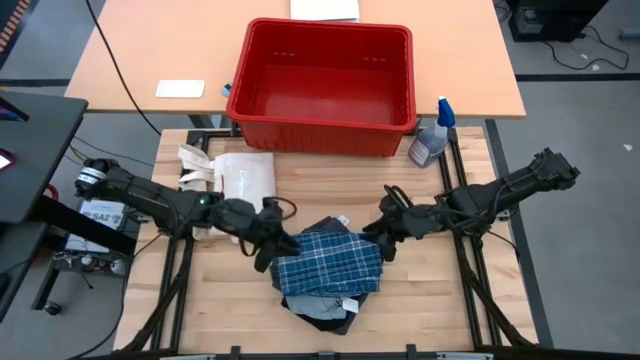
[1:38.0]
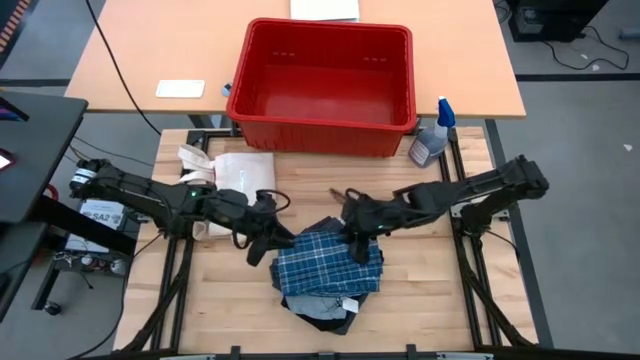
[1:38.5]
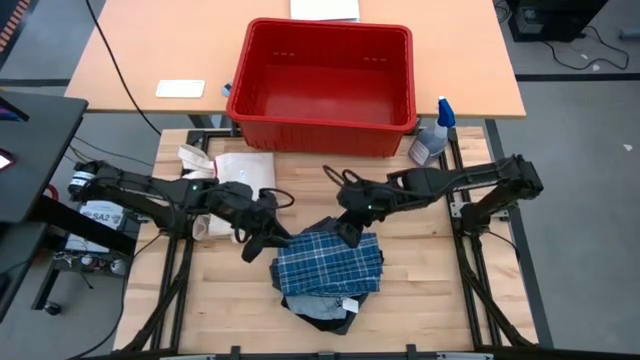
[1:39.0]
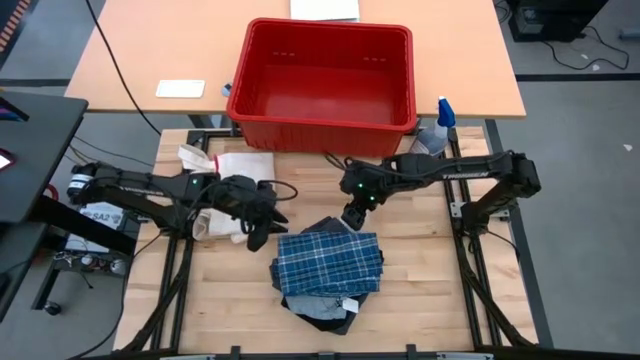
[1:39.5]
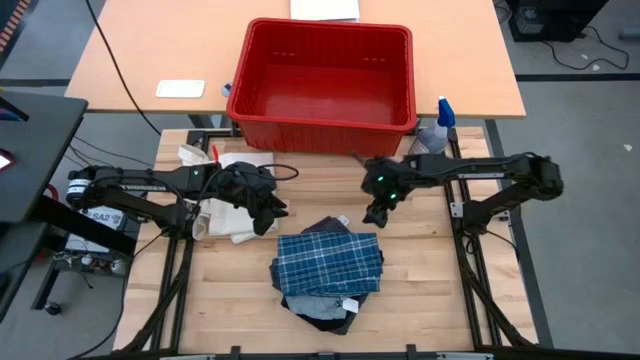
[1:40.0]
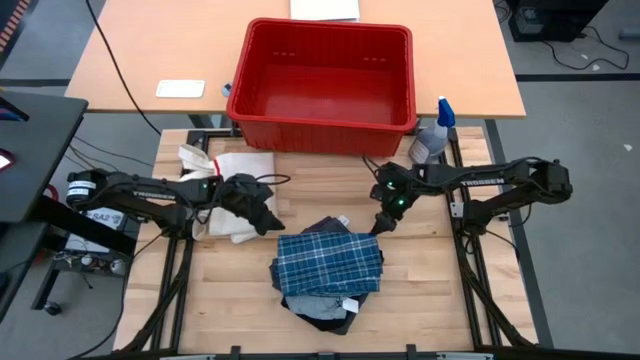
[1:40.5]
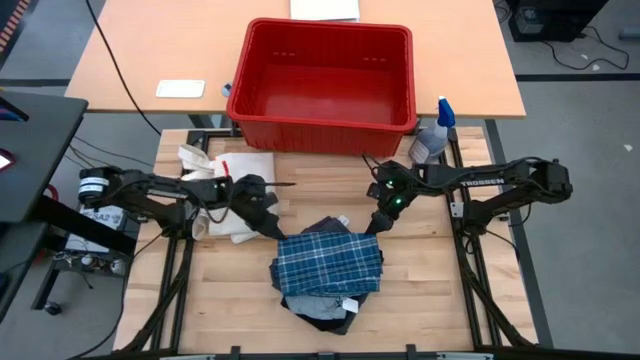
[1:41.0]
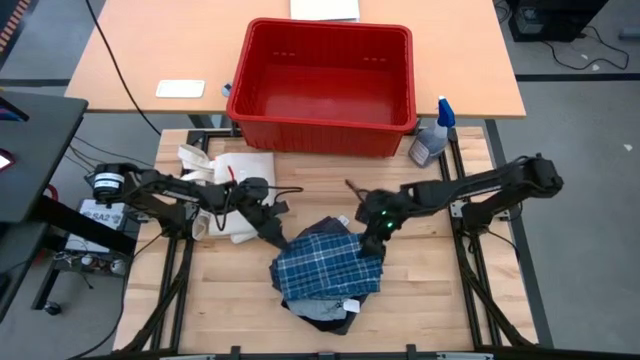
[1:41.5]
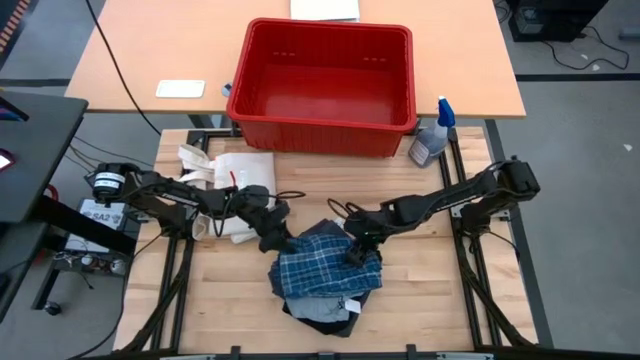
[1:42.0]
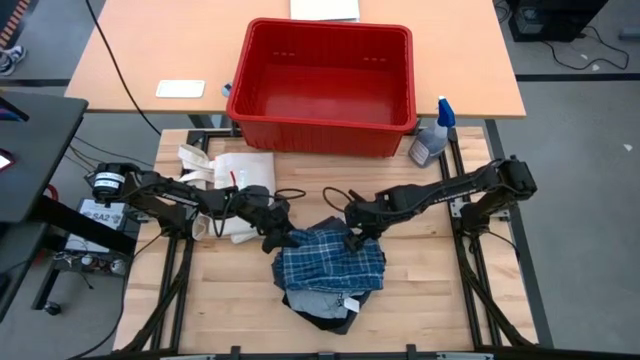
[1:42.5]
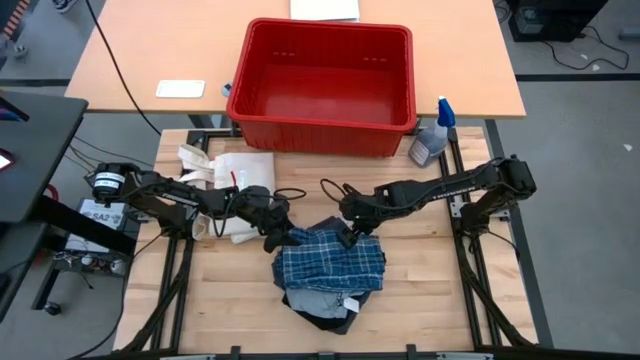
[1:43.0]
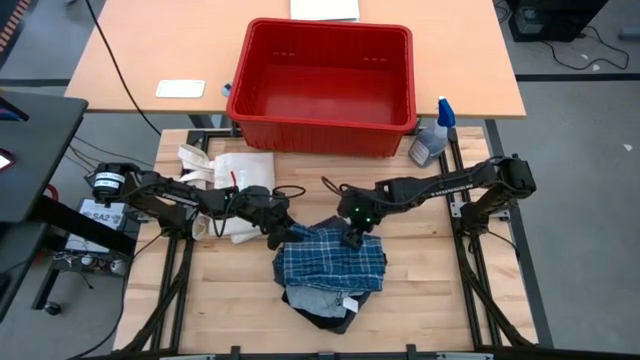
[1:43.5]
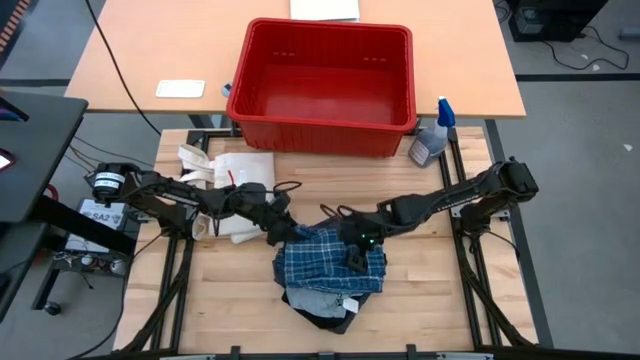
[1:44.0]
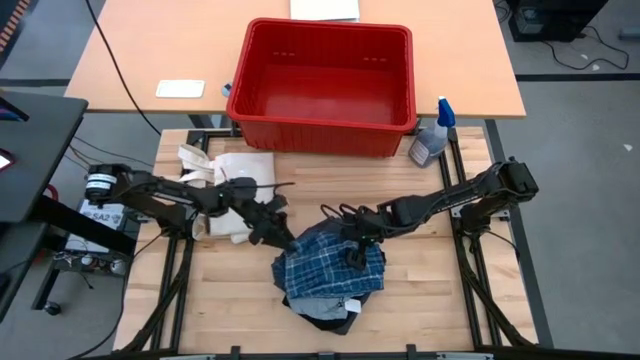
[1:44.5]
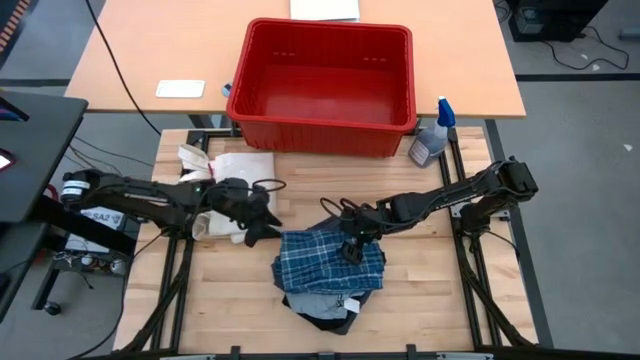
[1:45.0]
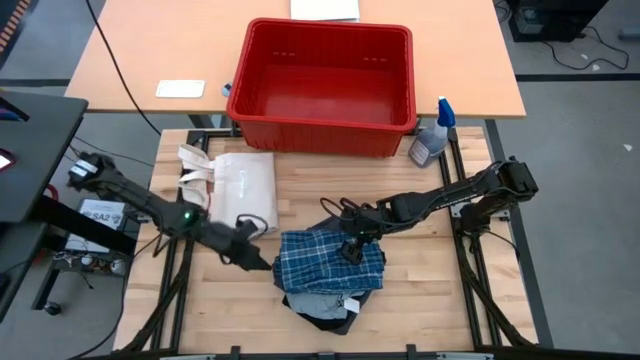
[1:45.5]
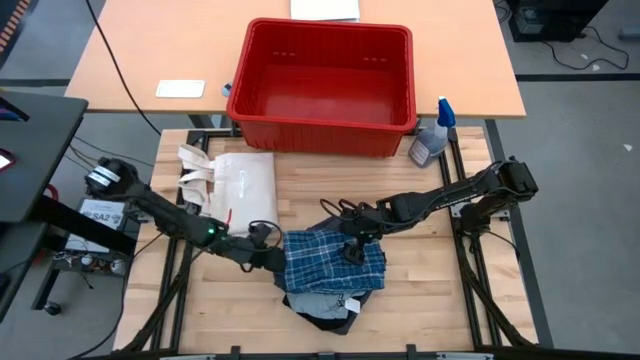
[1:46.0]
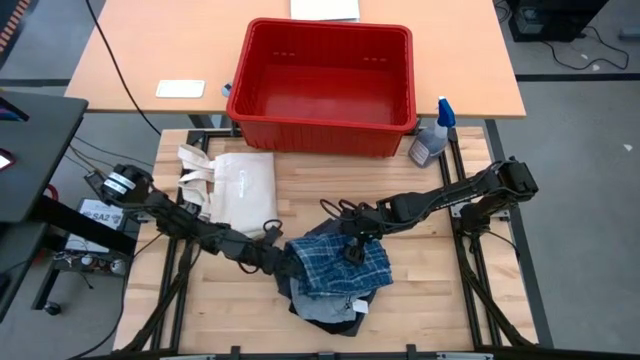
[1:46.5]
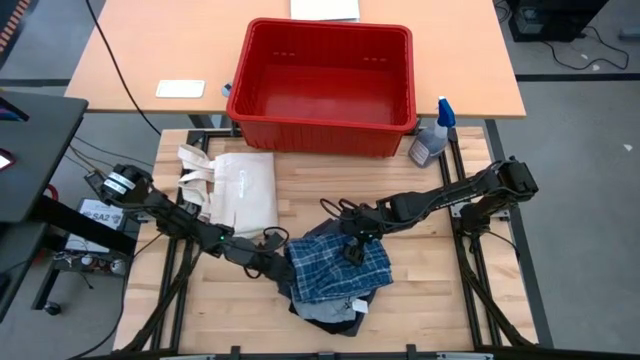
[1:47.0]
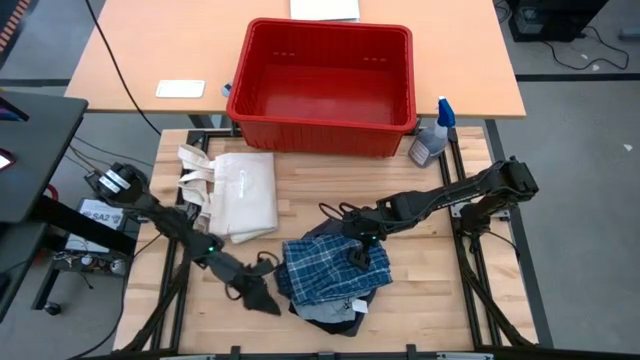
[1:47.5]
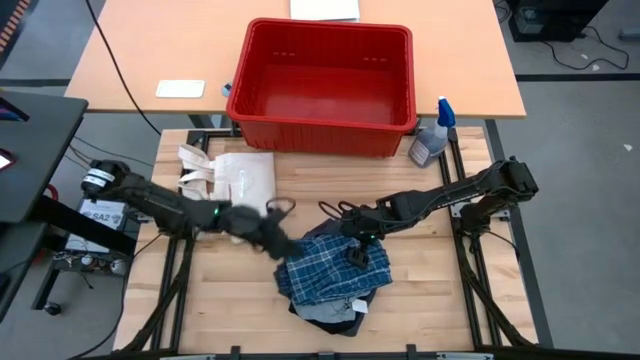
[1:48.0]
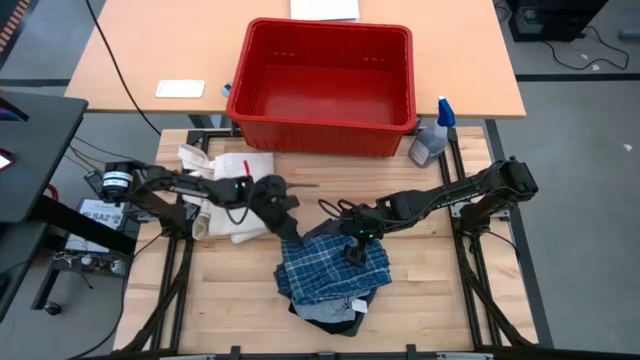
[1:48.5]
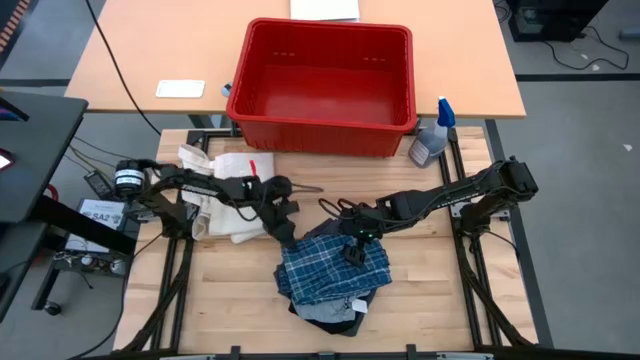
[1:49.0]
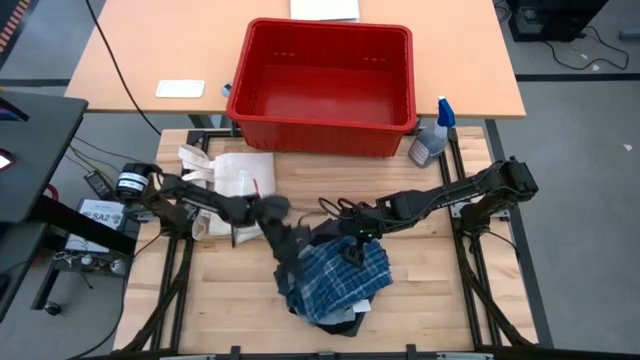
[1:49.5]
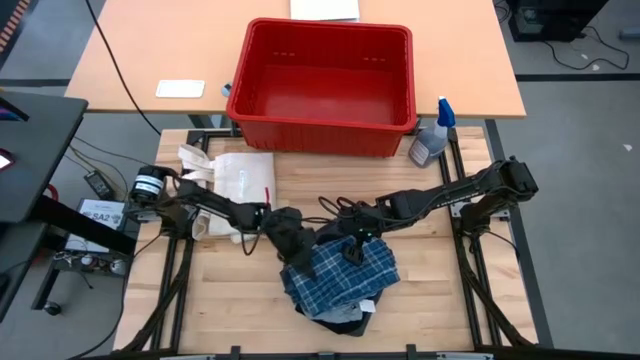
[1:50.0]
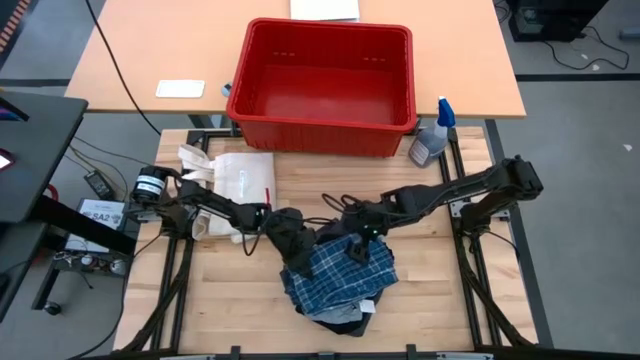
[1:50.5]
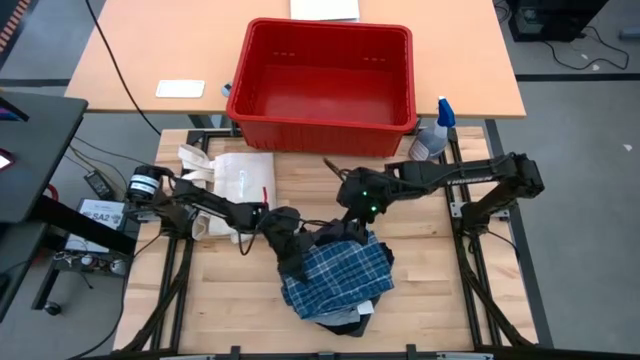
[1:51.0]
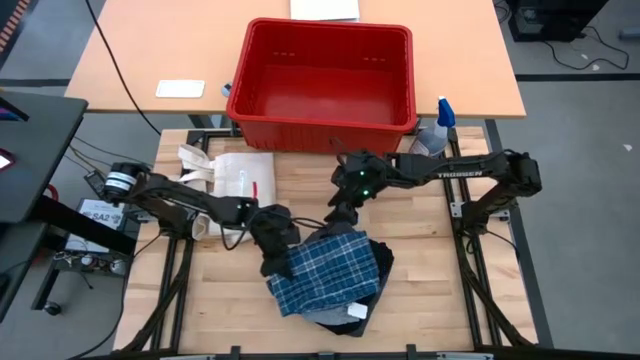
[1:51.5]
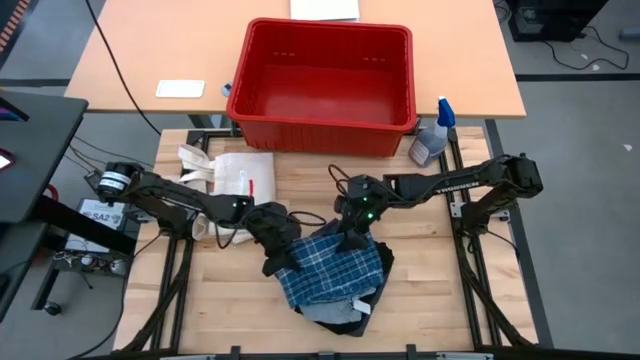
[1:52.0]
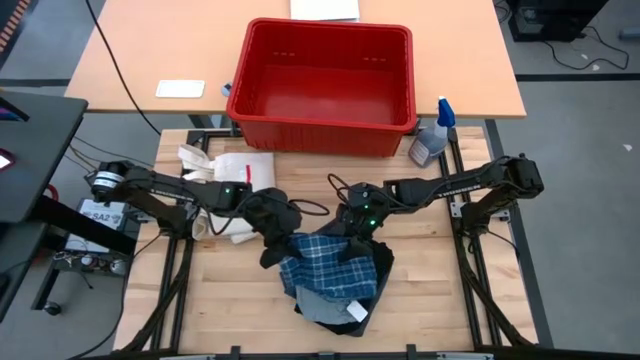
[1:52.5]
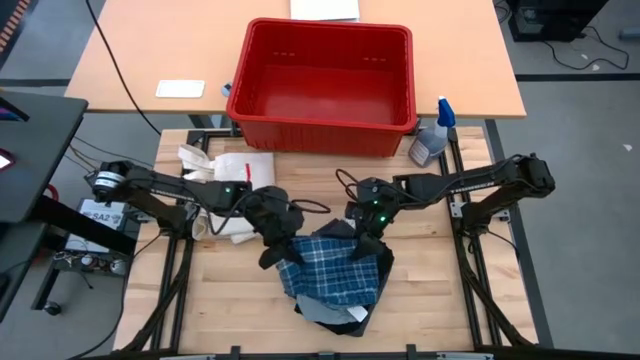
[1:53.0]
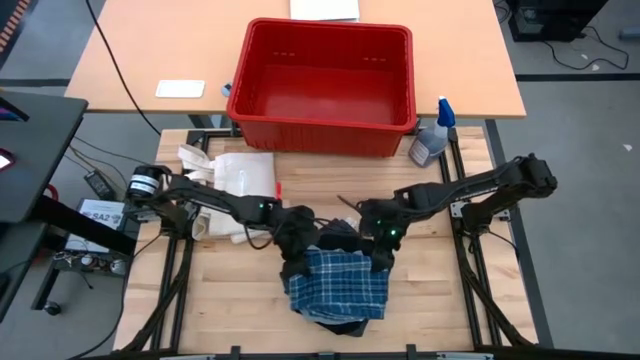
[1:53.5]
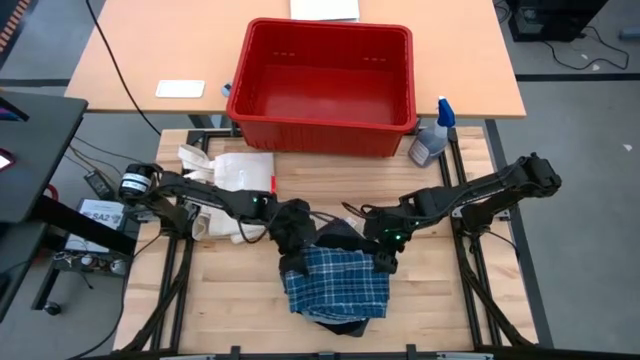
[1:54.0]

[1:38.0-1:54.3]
Task: Sort clothes
Adjust the blue pants on top of the stacked clothes

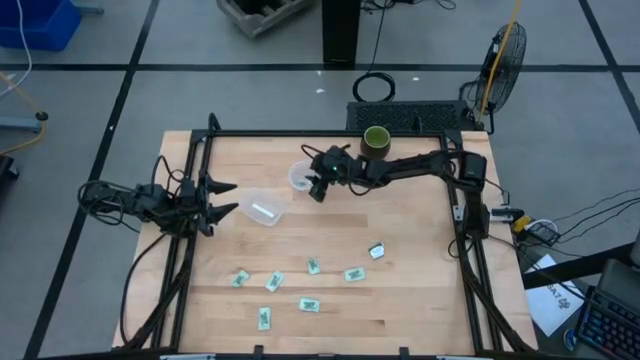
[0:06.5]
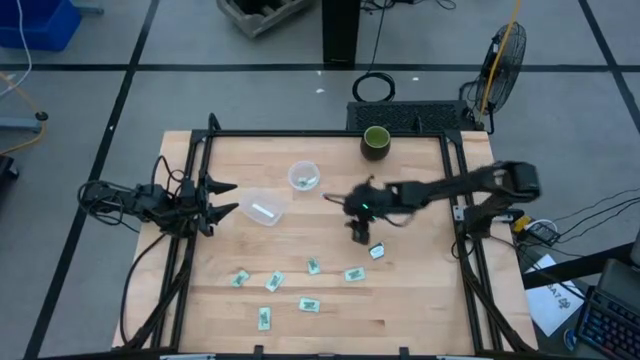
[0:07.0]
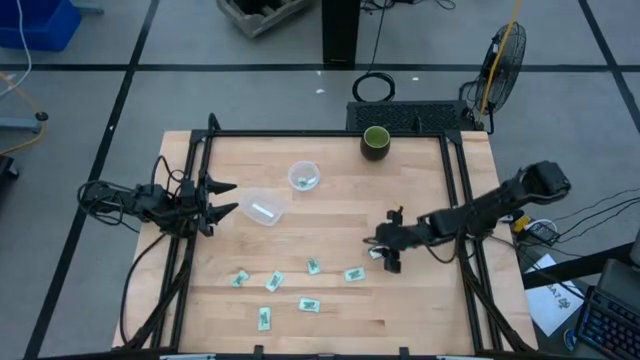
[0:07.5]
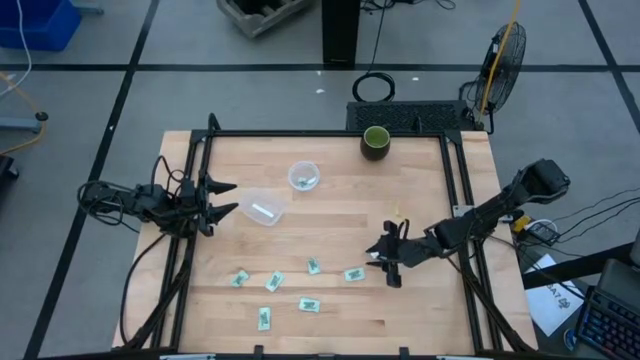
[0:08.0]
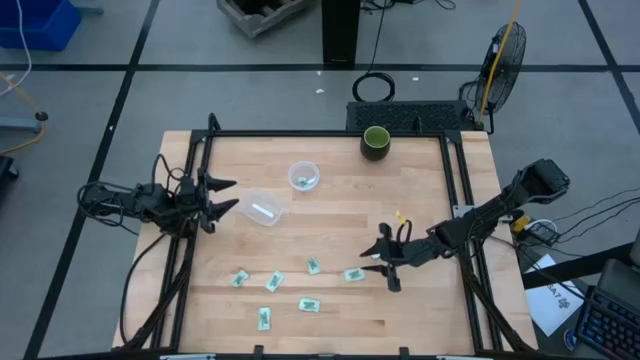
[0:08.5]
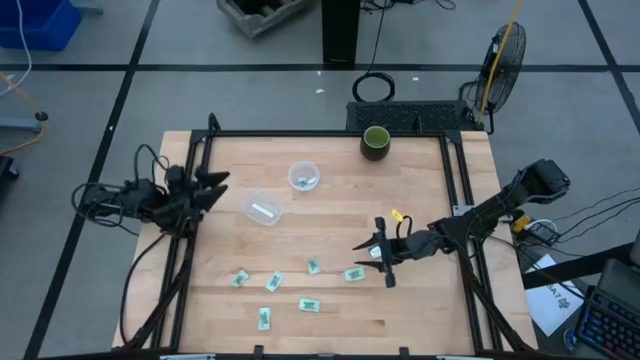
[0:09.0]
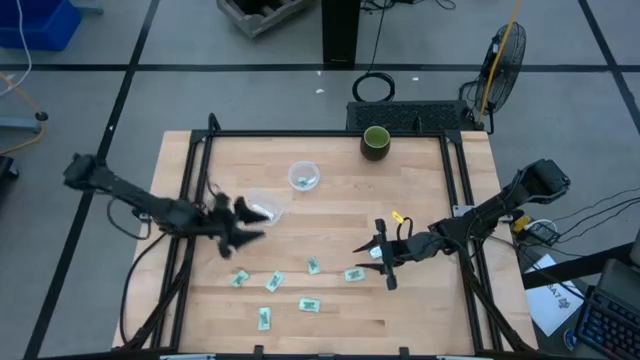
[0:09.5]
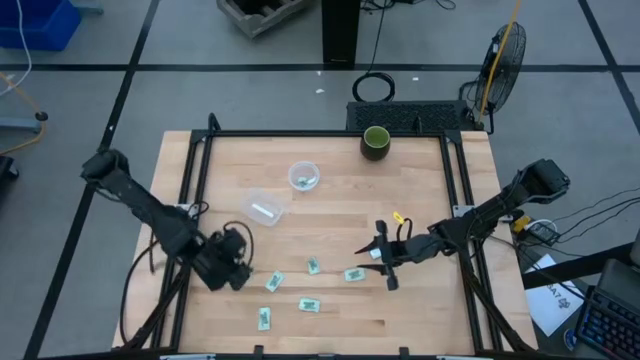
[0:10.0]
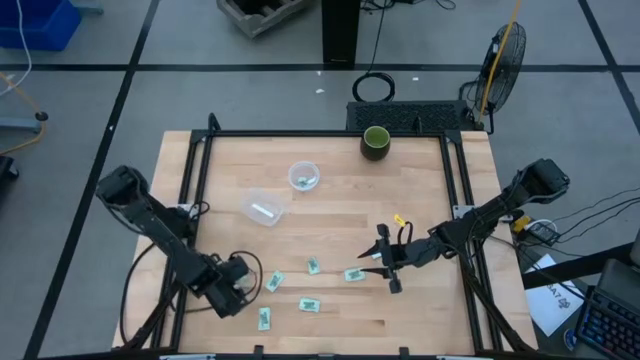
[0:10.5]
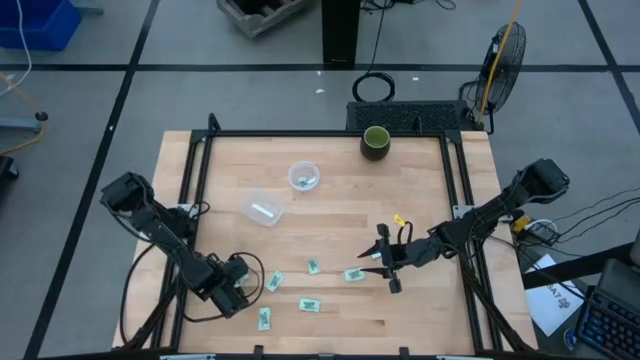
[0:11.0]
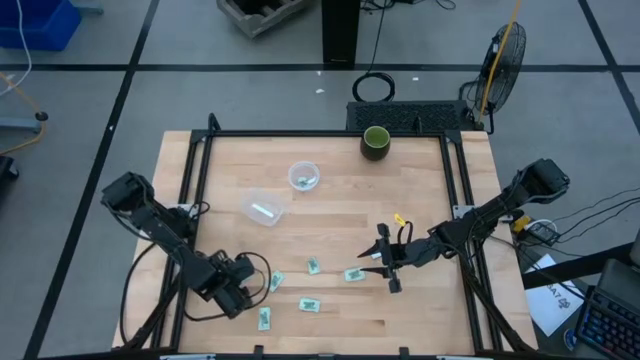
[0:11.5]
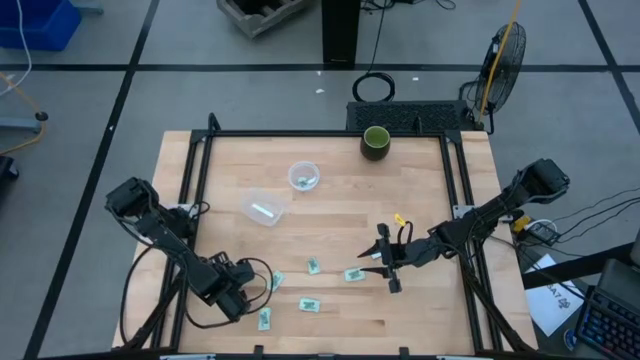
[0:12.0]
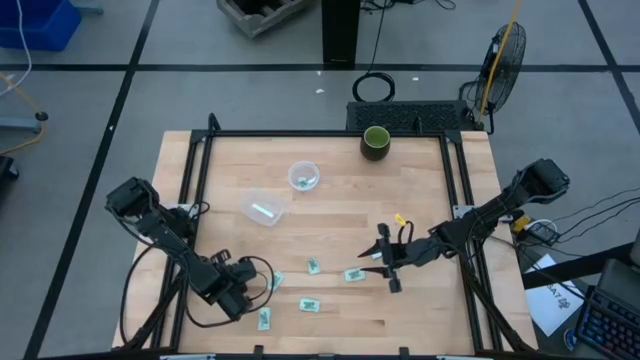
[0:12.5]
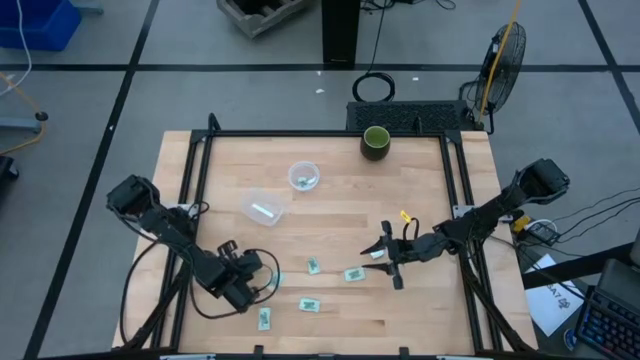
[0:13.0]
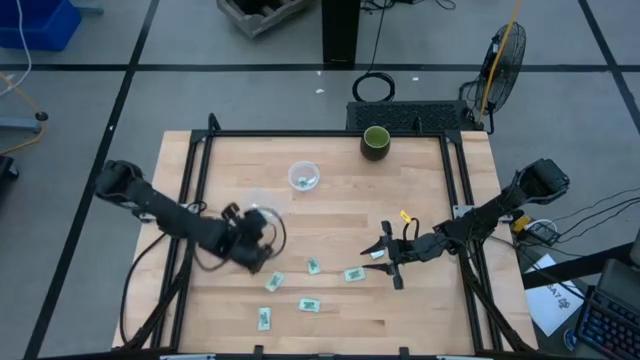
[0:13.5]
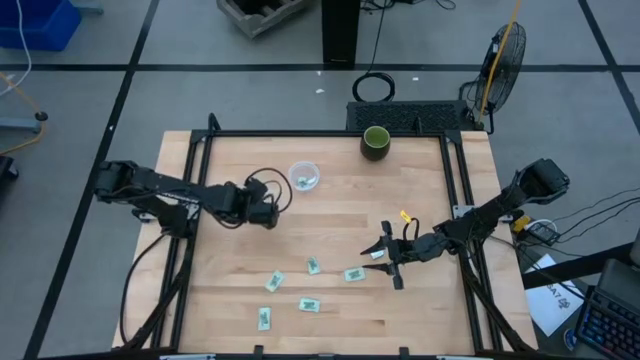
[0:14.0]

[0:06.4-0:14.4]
Task: Pick and place Stevia / Truvia into bins
Put the stevia packet into the bottom container
